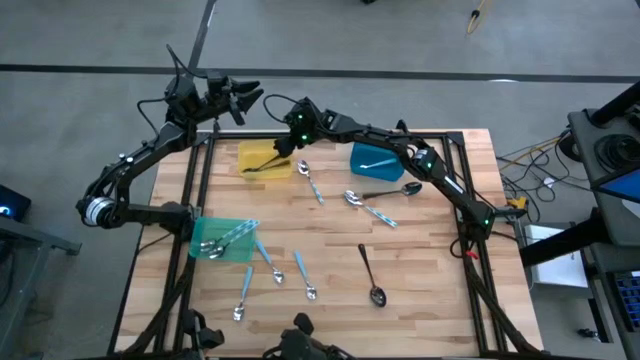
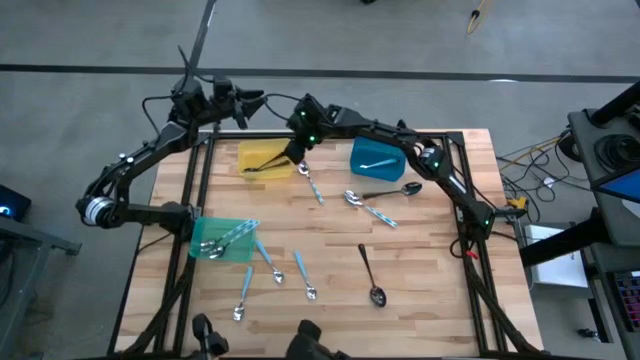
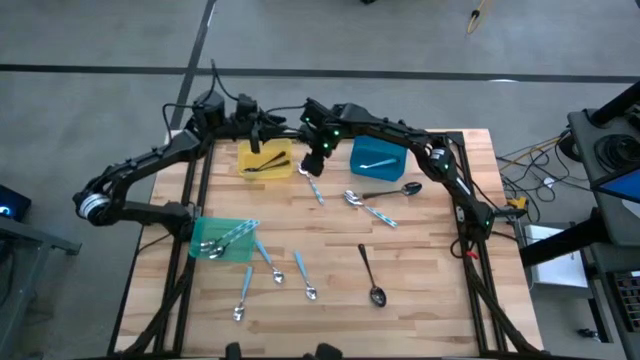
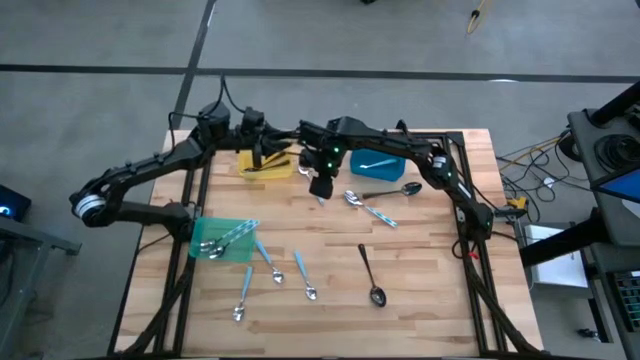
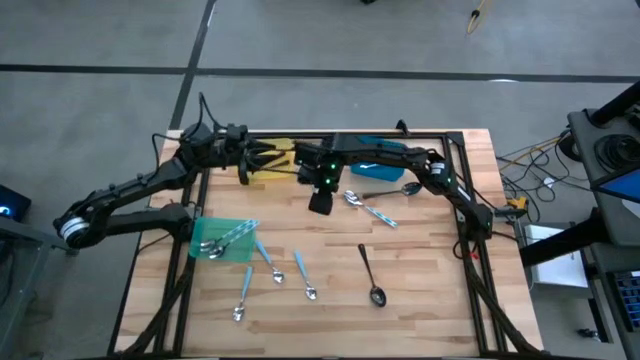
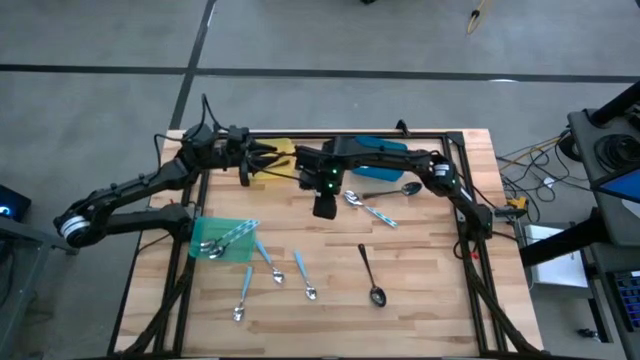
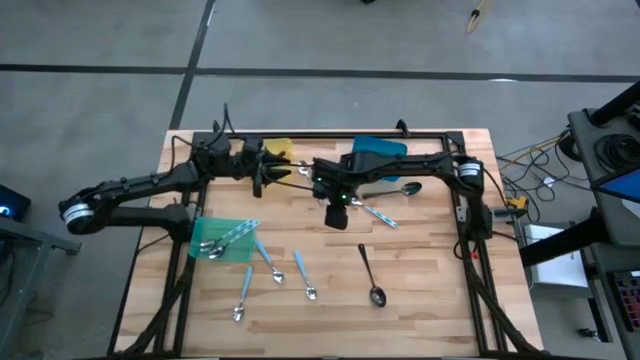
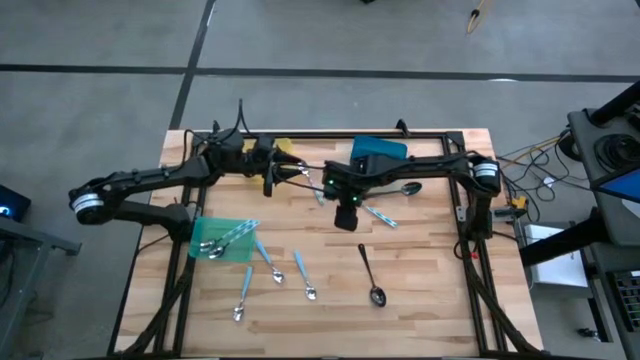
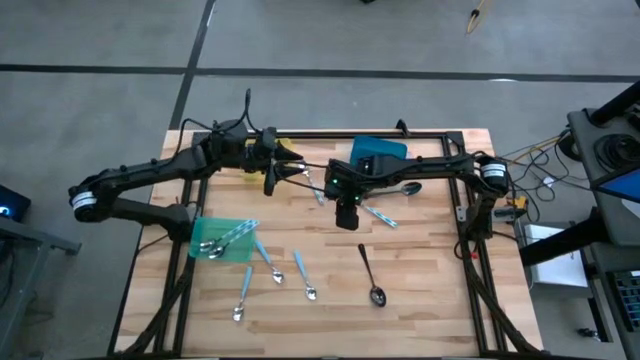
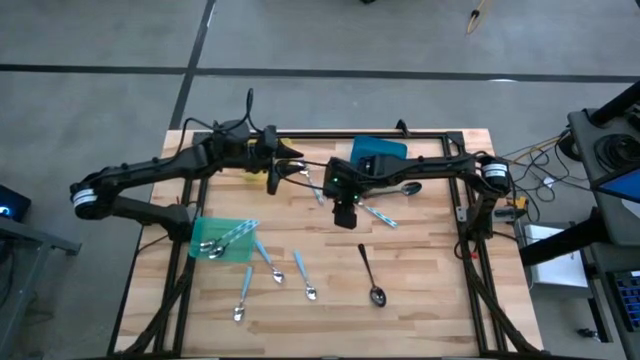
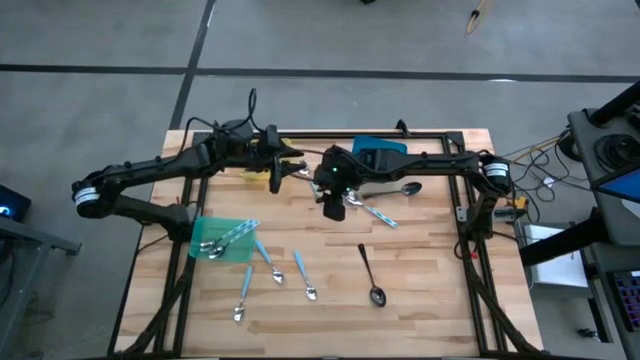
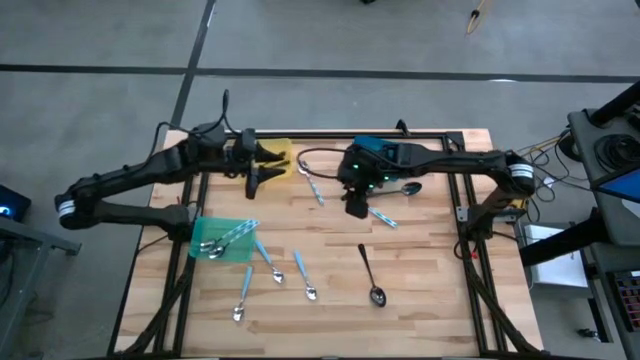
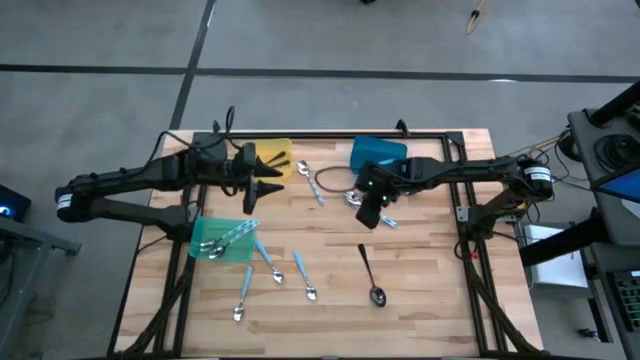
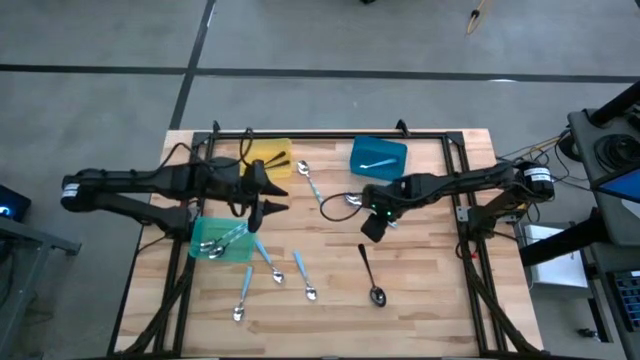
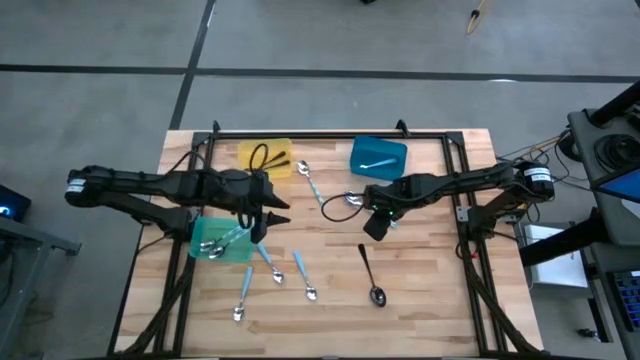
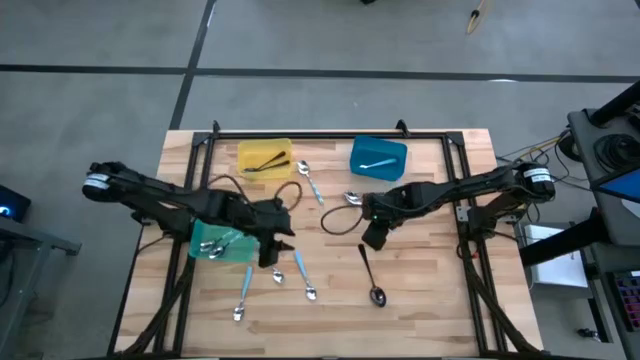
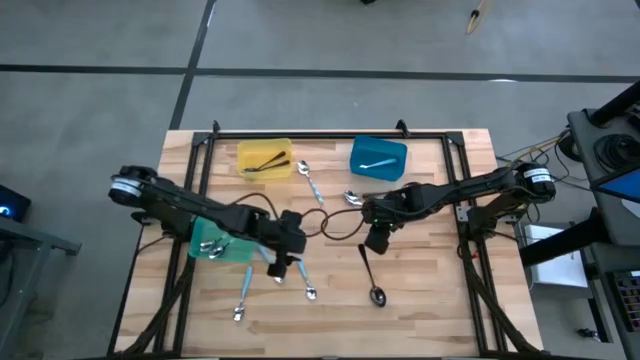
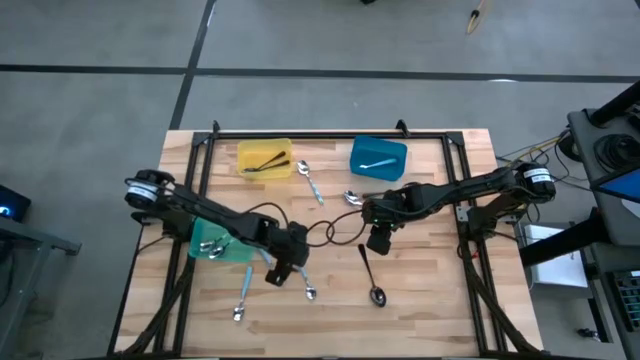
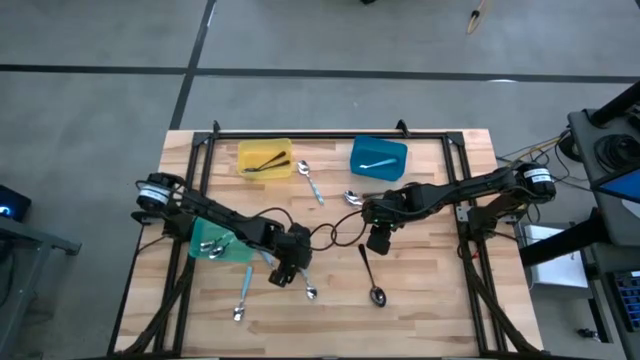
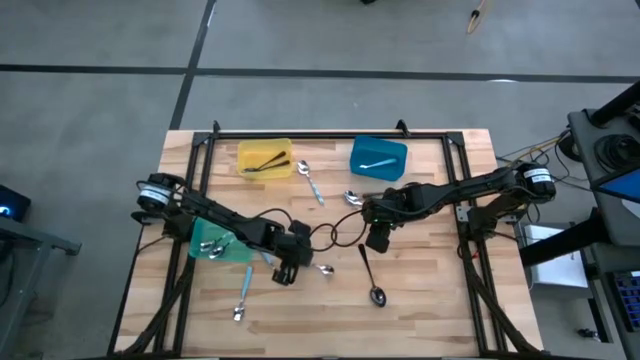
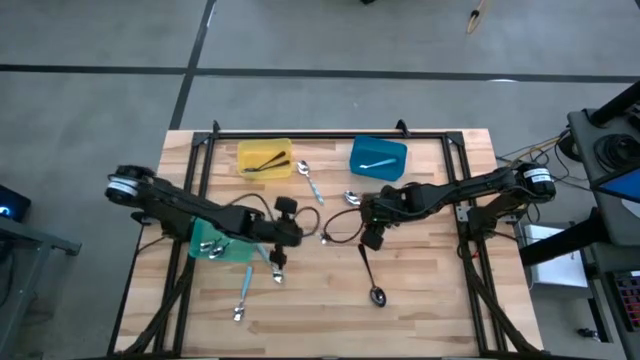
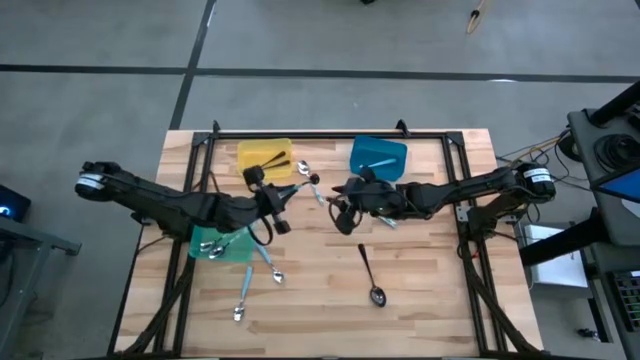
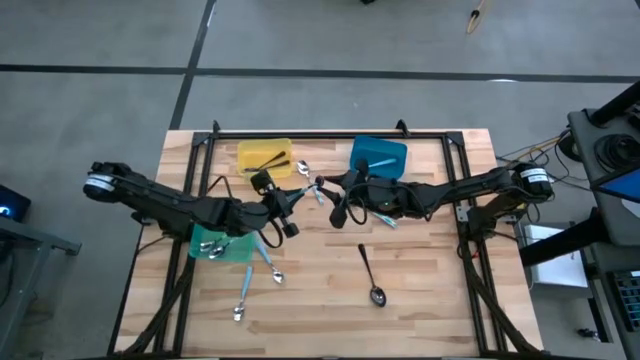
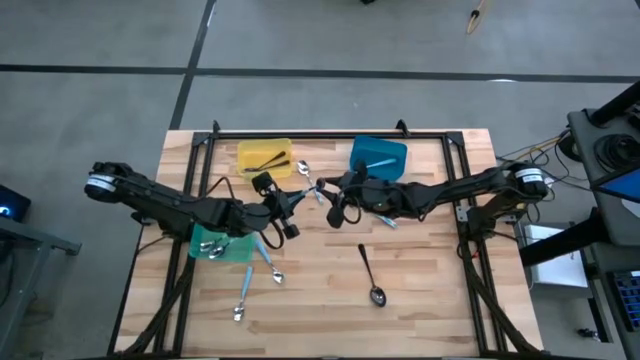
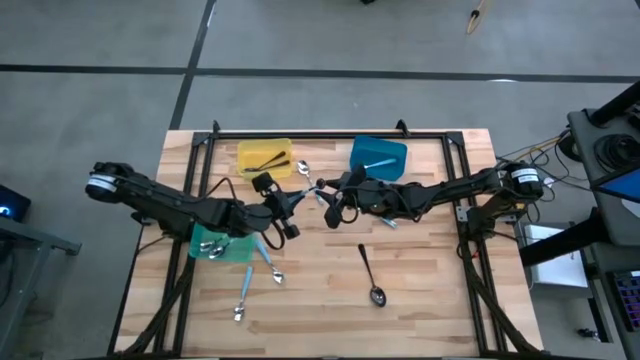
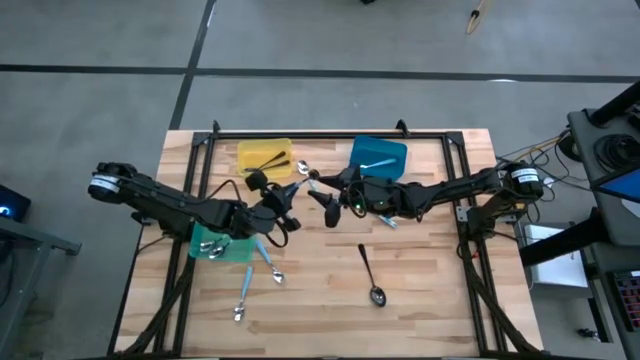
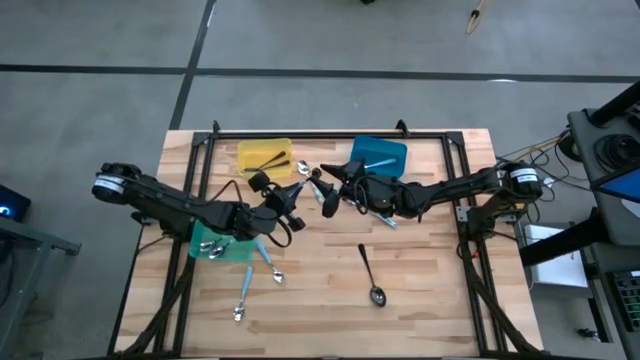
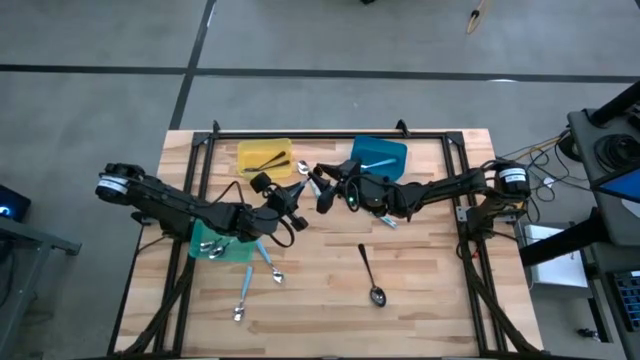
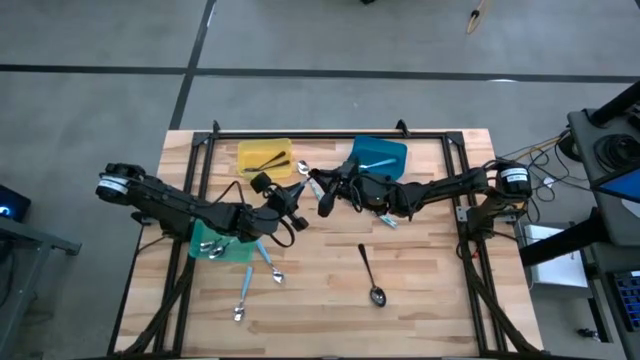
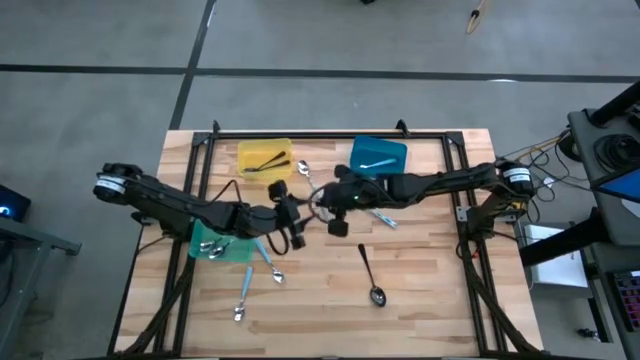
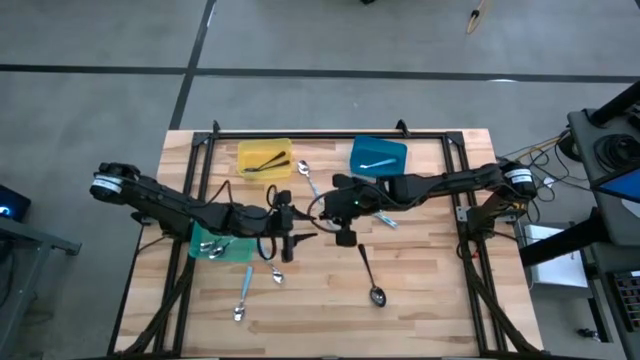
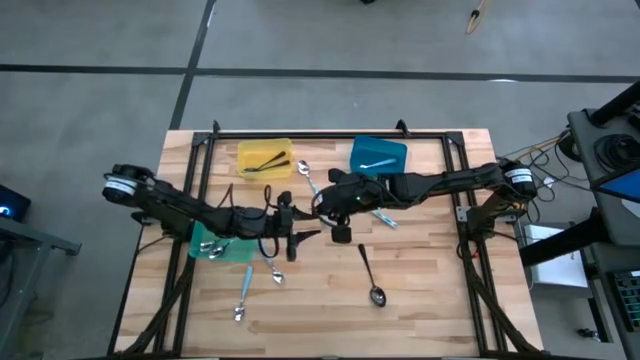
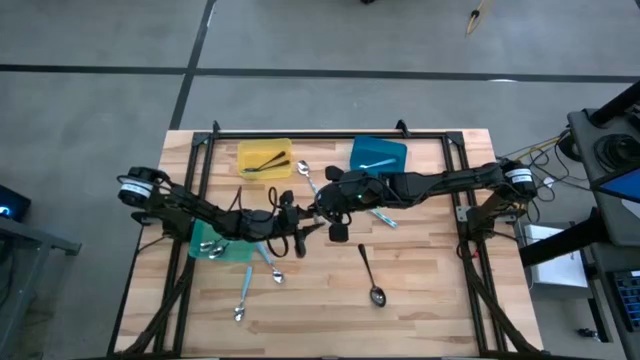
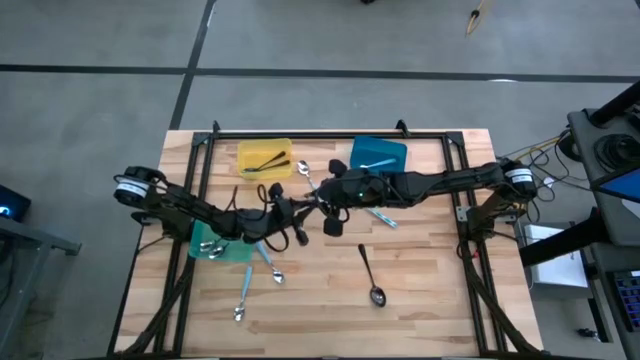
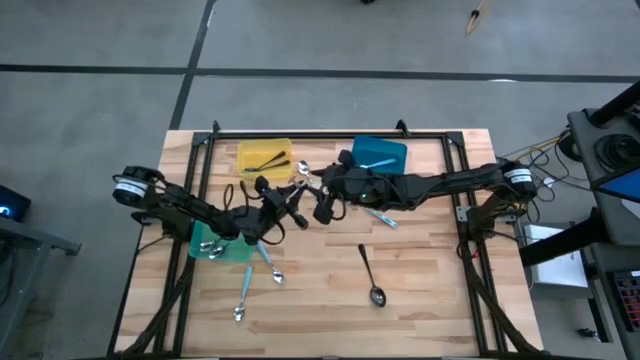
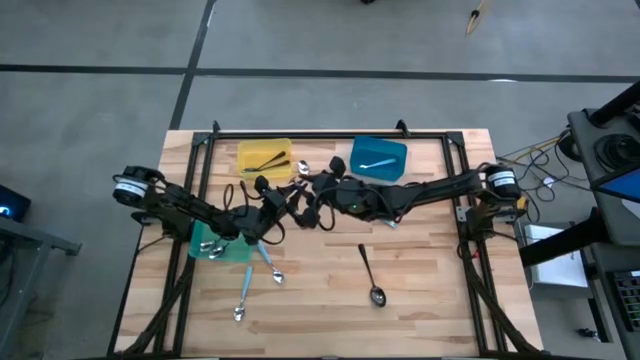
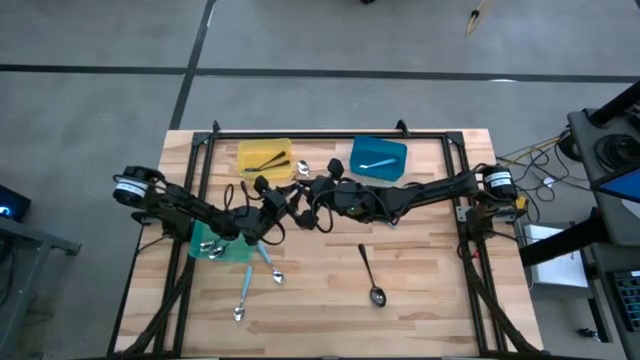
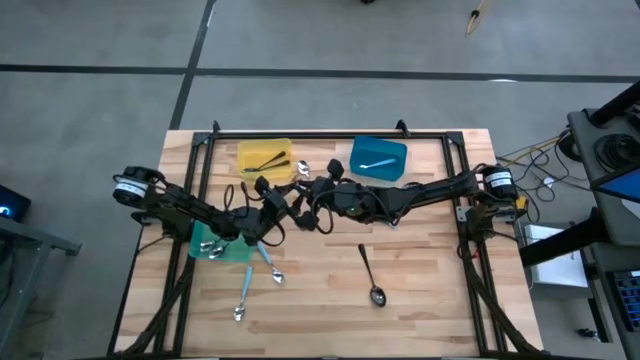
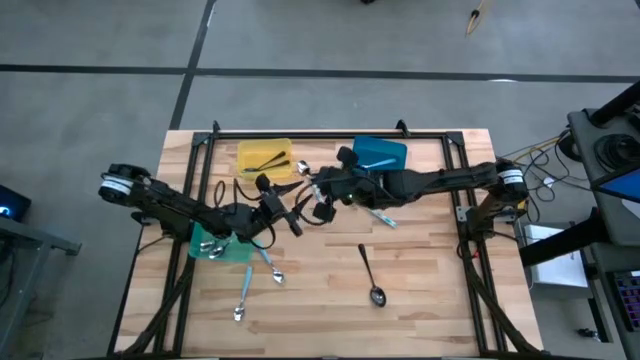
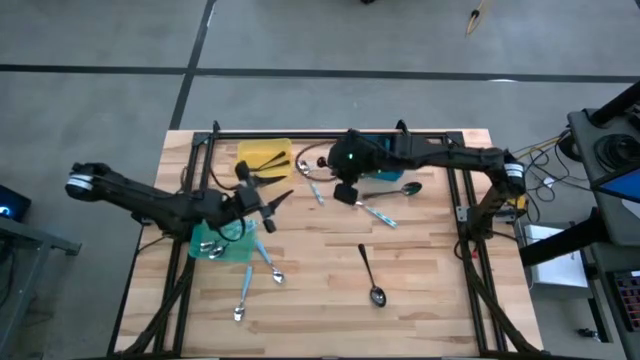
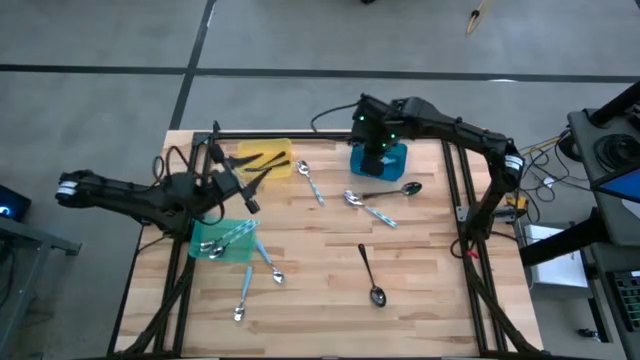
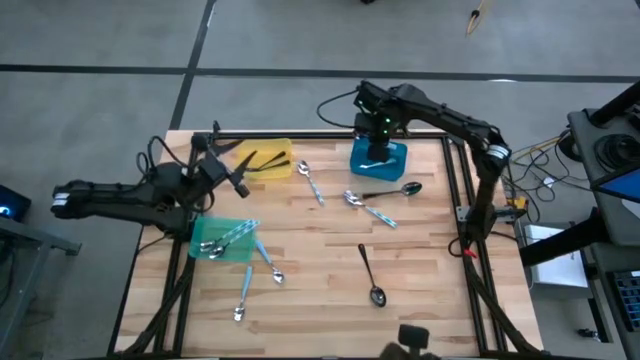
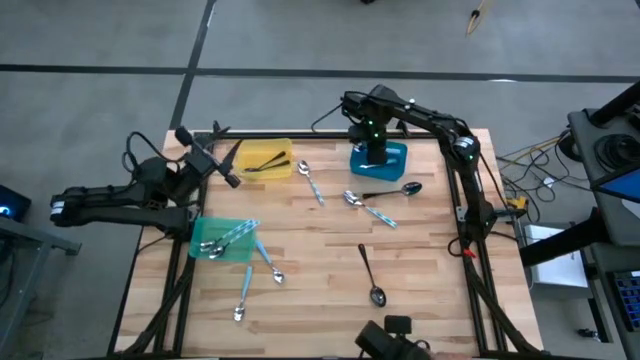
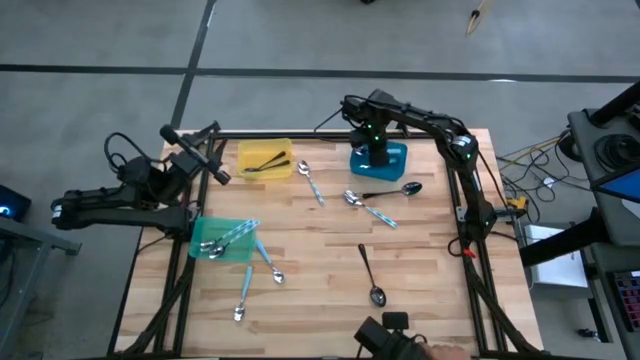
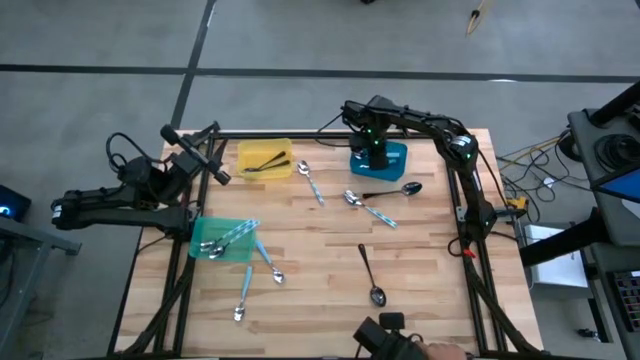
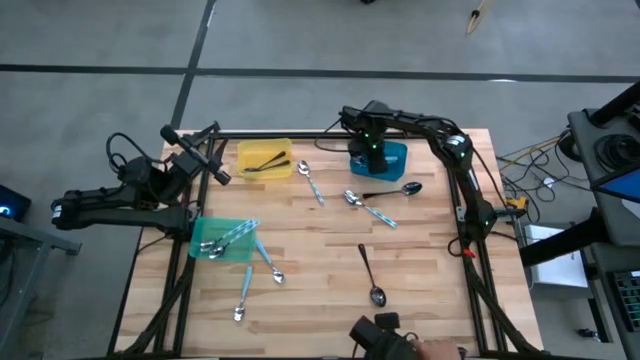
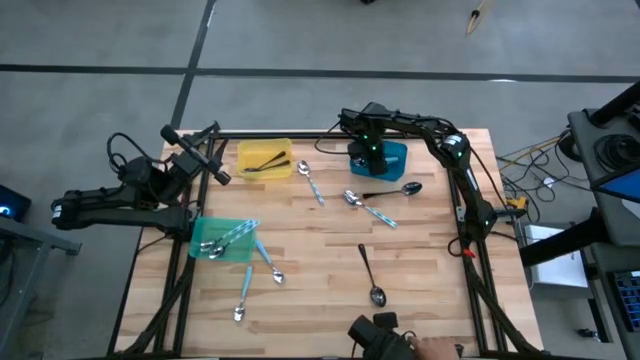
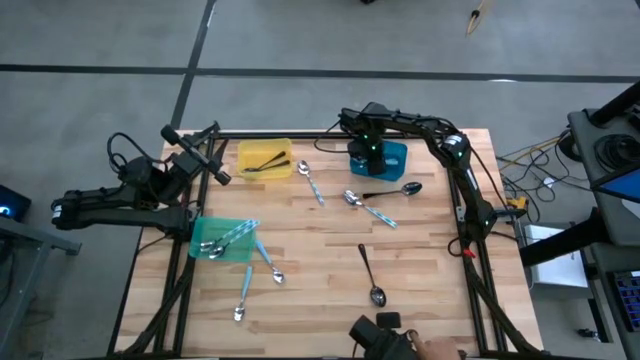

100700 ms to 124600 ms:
Task: Sort silverware by color (type)
Put the blue spoon into the blue bin
